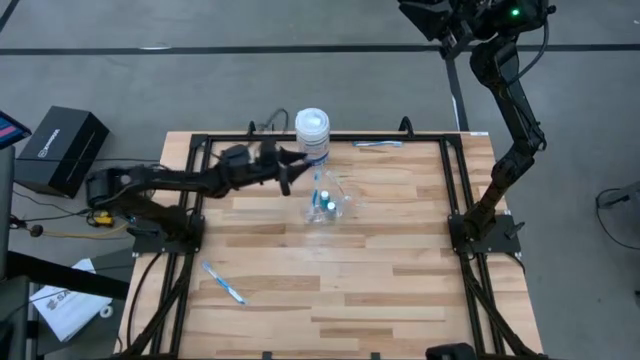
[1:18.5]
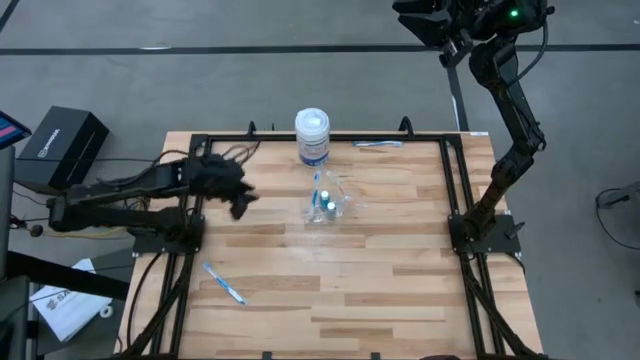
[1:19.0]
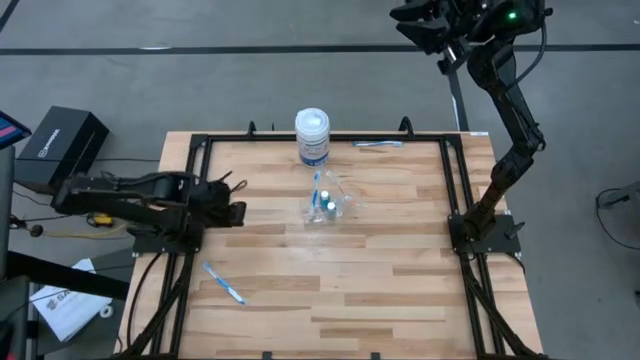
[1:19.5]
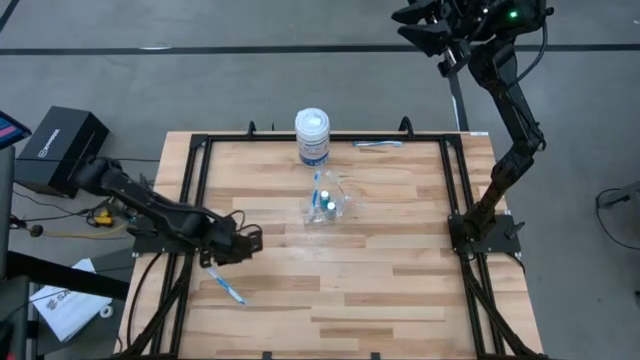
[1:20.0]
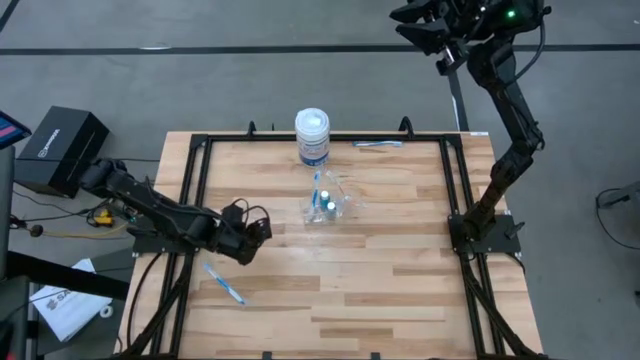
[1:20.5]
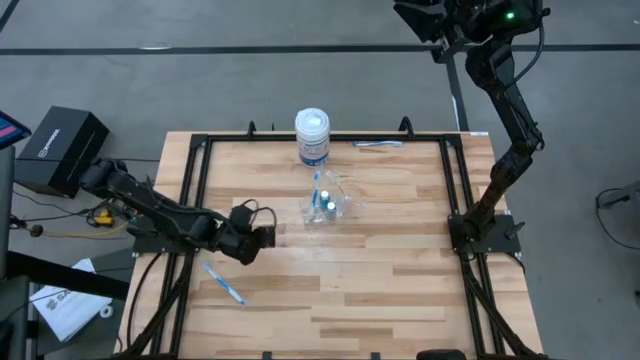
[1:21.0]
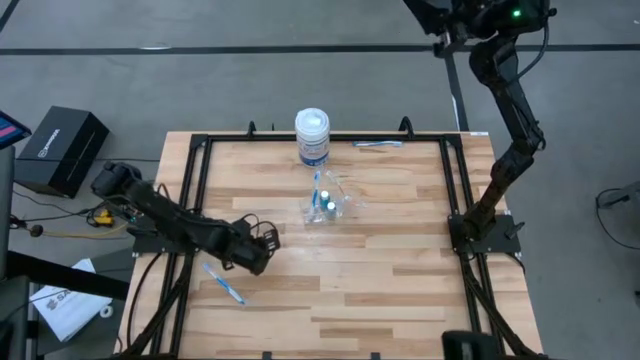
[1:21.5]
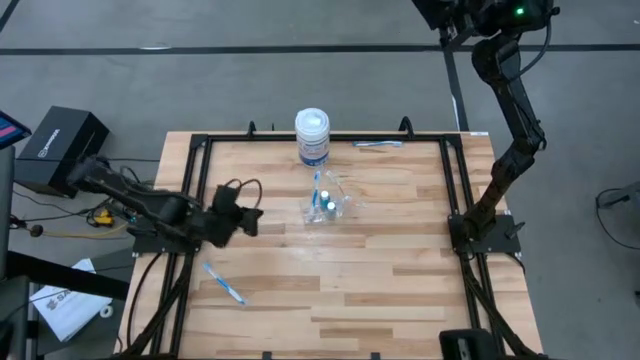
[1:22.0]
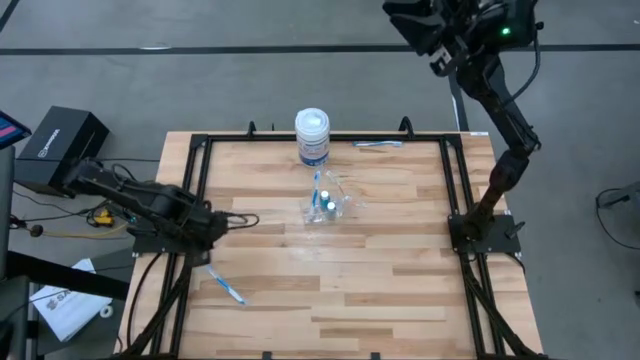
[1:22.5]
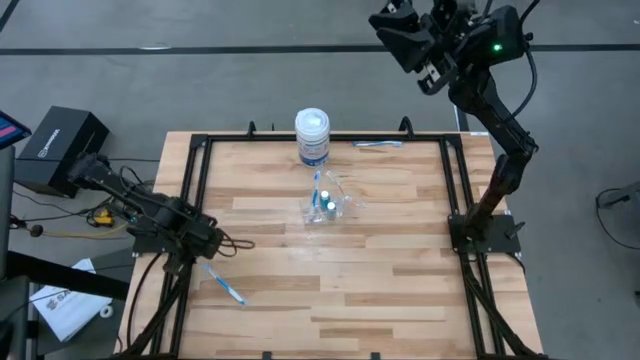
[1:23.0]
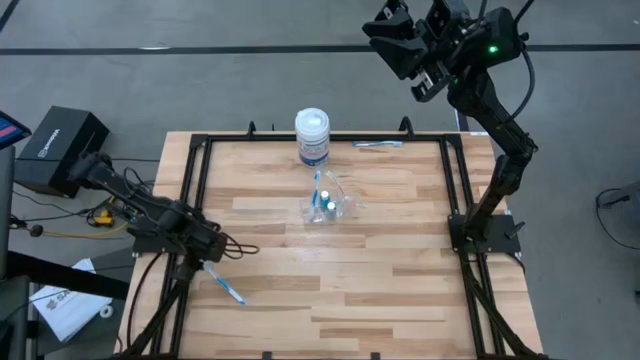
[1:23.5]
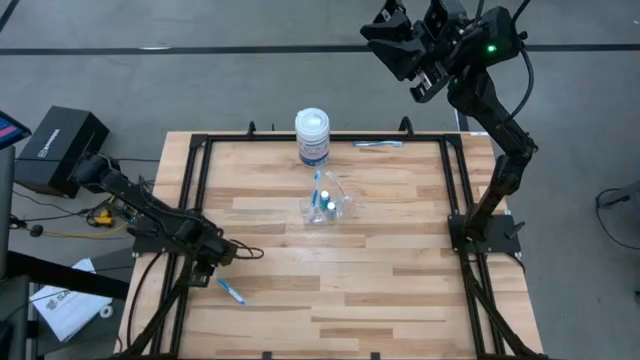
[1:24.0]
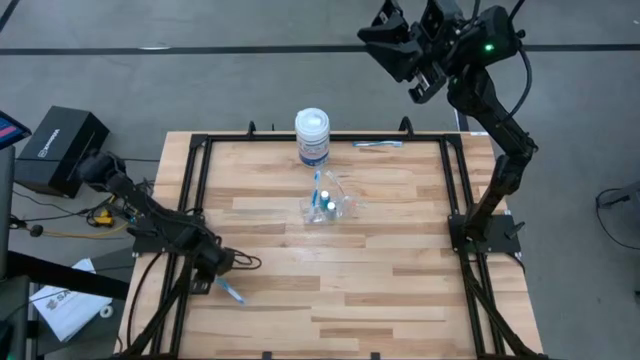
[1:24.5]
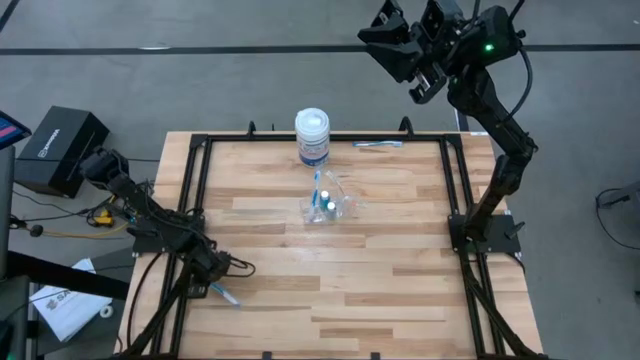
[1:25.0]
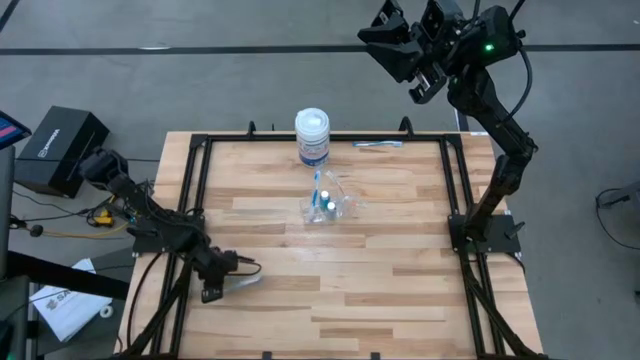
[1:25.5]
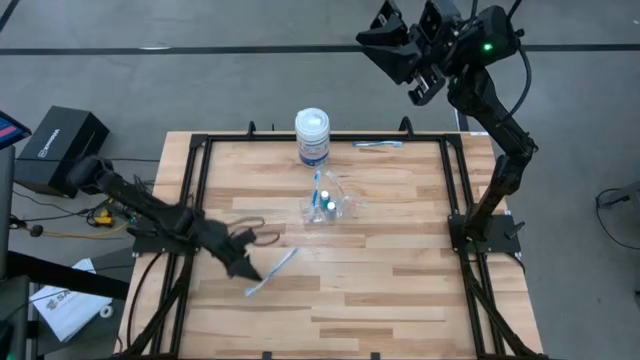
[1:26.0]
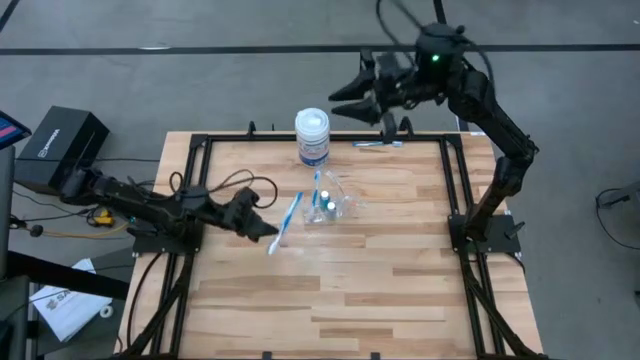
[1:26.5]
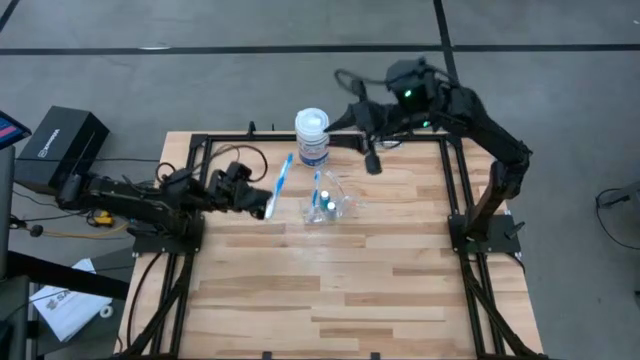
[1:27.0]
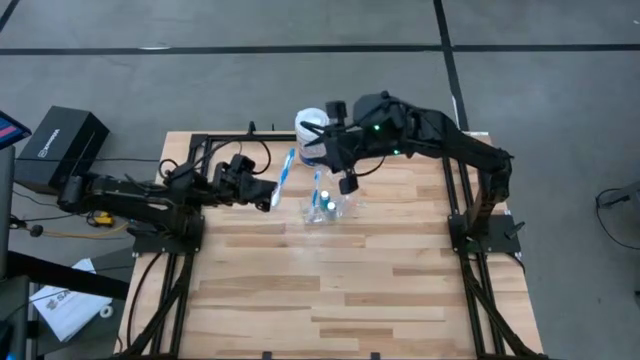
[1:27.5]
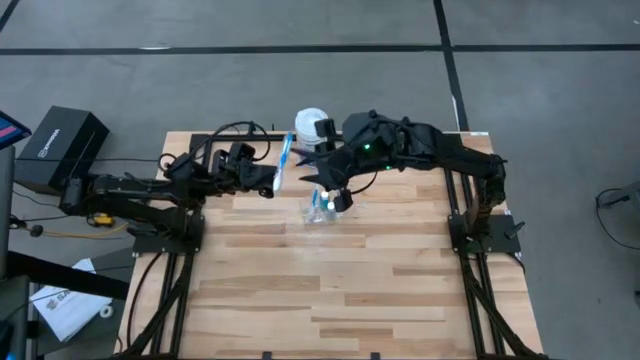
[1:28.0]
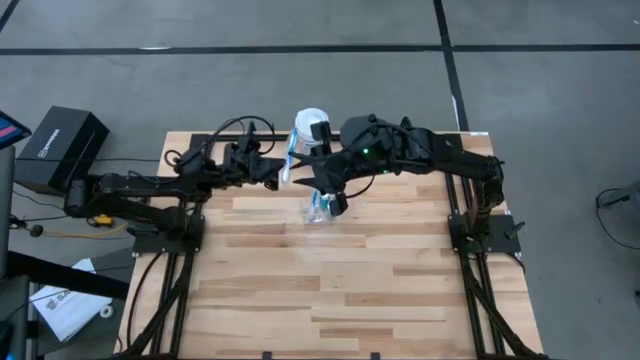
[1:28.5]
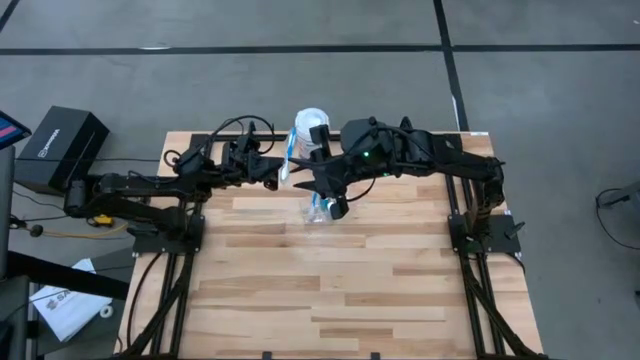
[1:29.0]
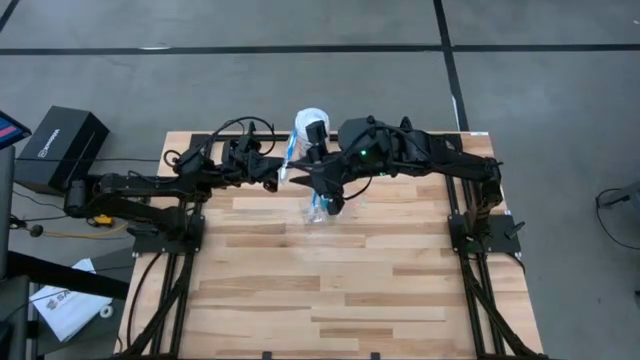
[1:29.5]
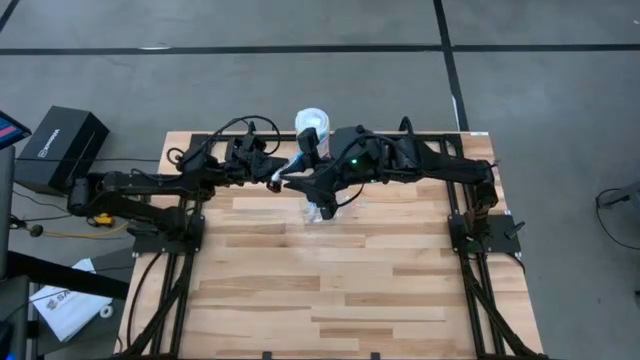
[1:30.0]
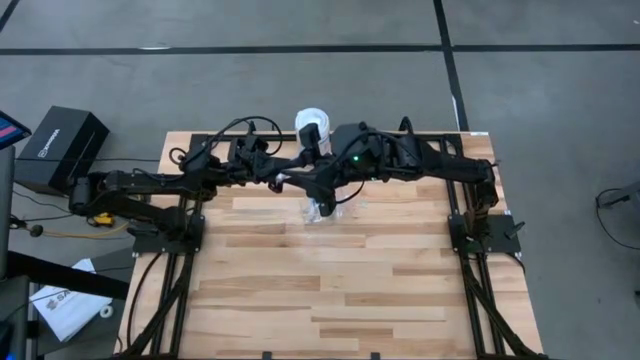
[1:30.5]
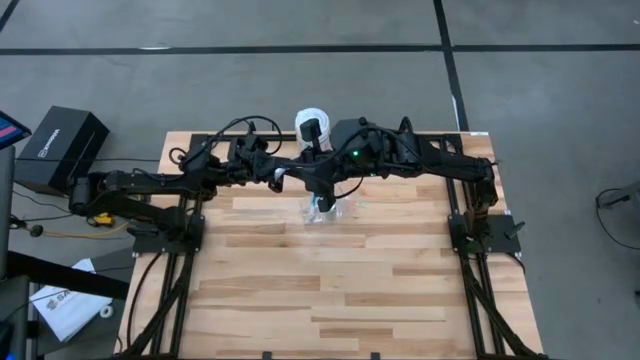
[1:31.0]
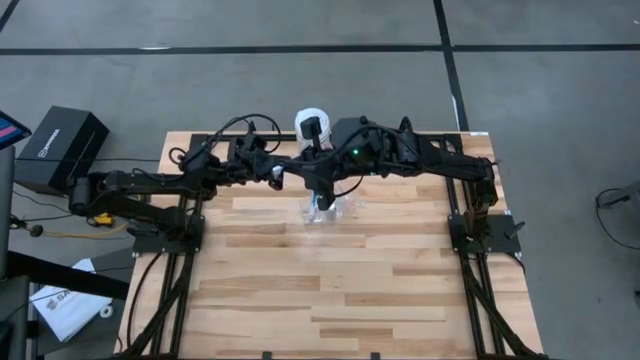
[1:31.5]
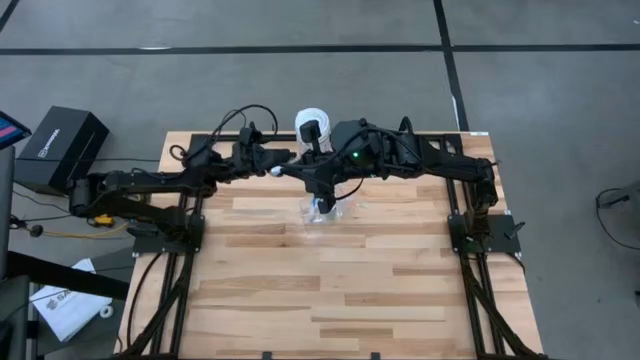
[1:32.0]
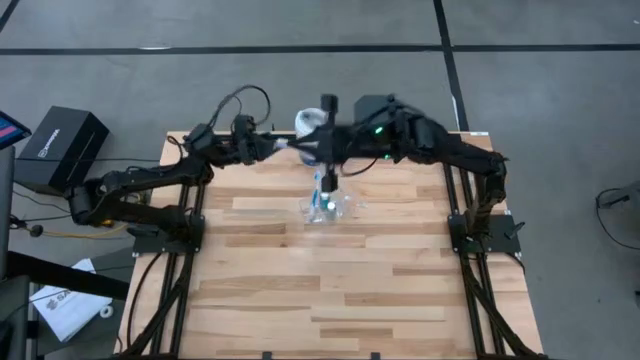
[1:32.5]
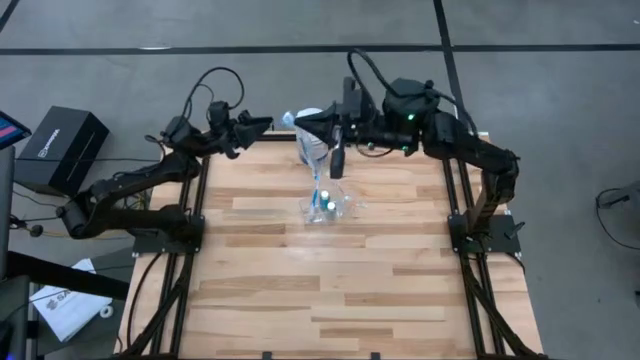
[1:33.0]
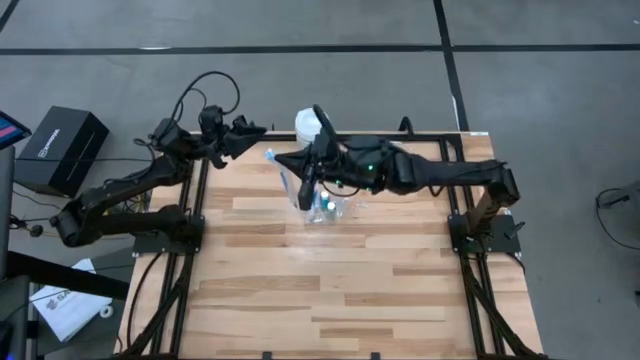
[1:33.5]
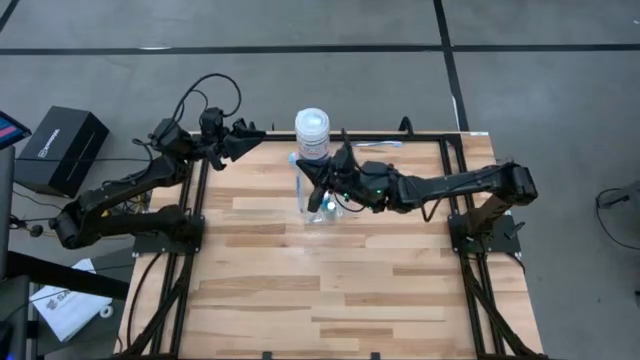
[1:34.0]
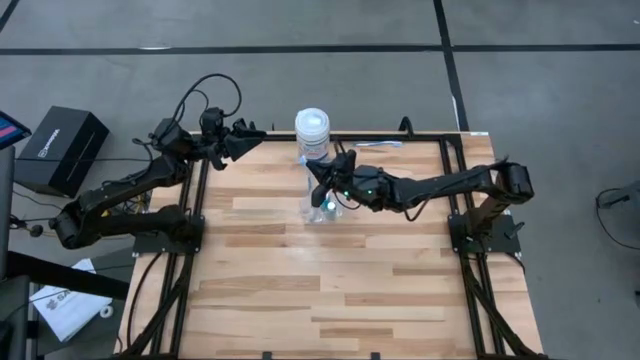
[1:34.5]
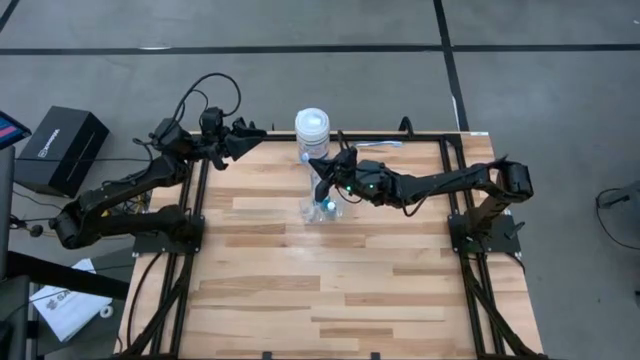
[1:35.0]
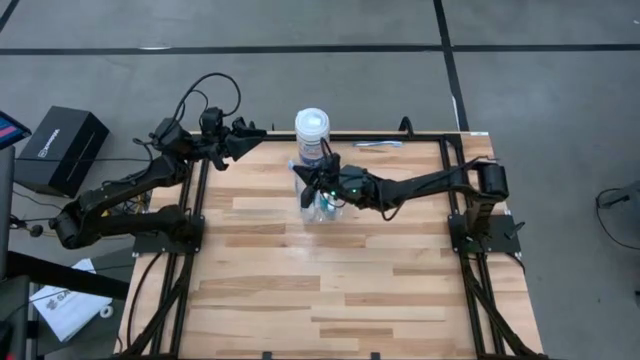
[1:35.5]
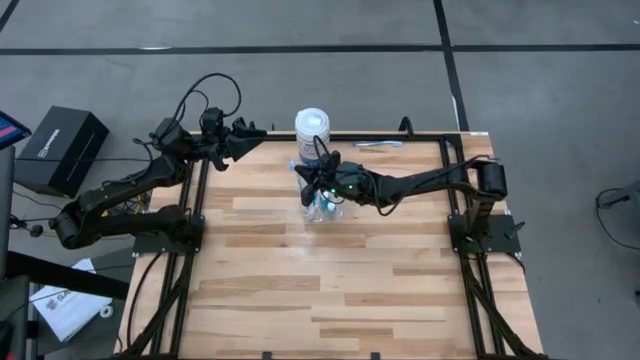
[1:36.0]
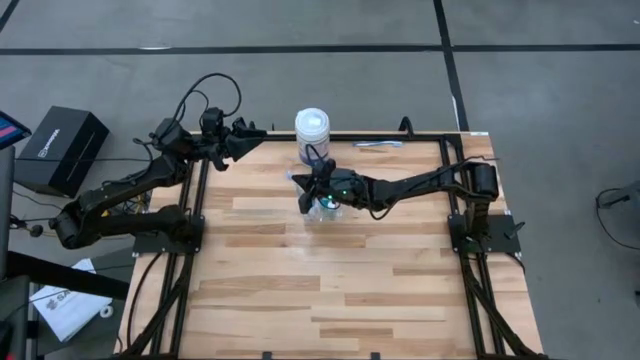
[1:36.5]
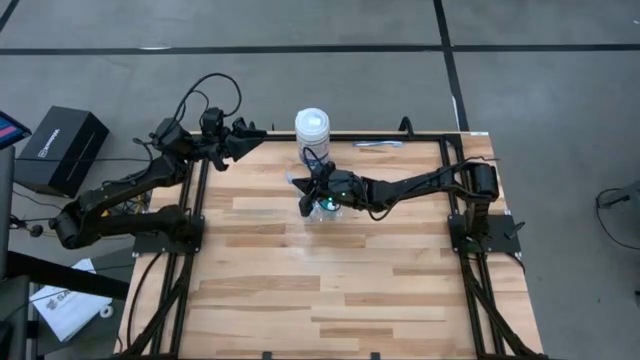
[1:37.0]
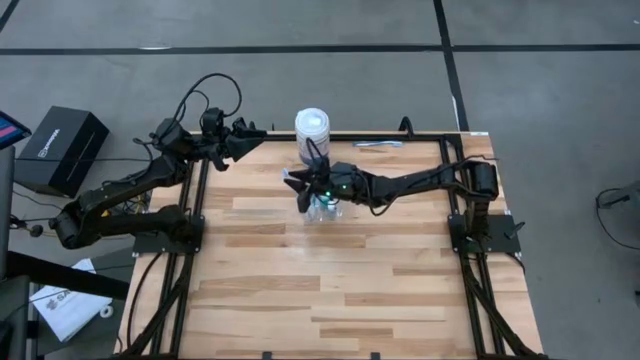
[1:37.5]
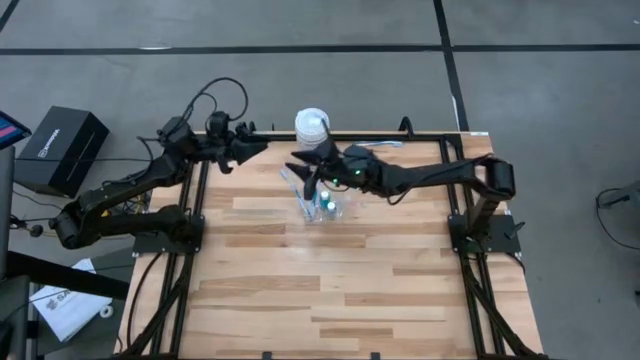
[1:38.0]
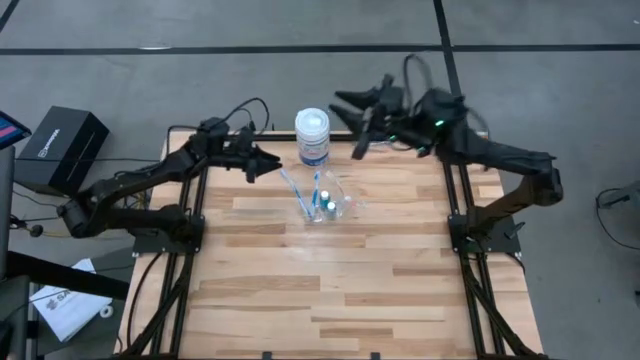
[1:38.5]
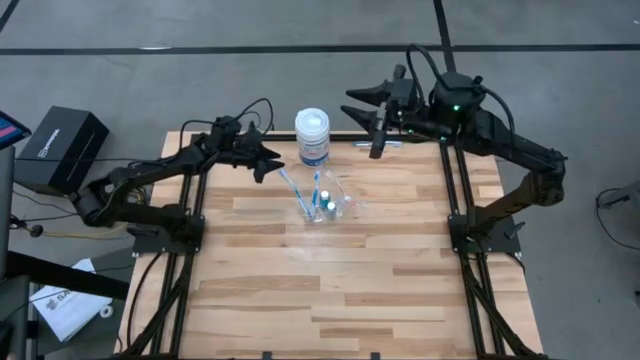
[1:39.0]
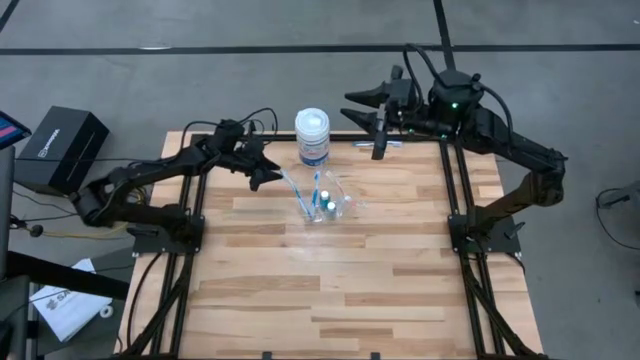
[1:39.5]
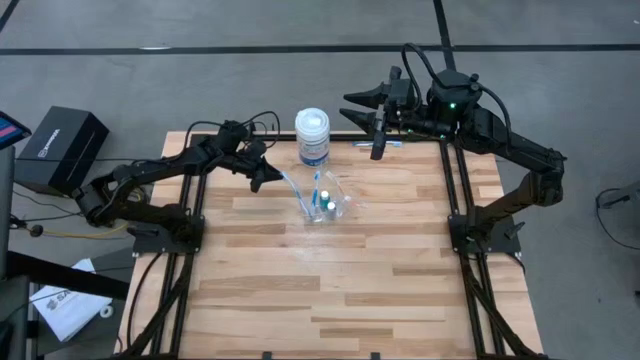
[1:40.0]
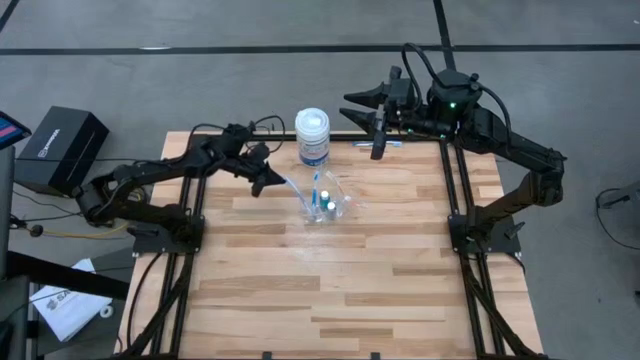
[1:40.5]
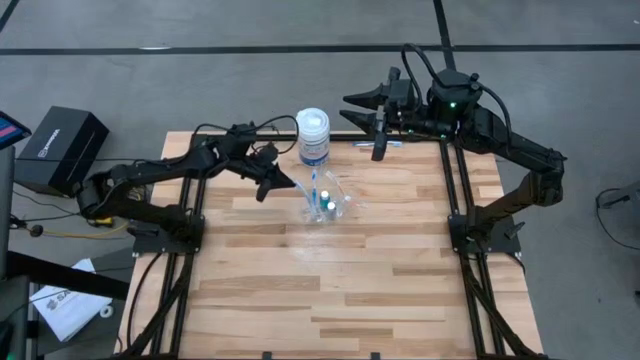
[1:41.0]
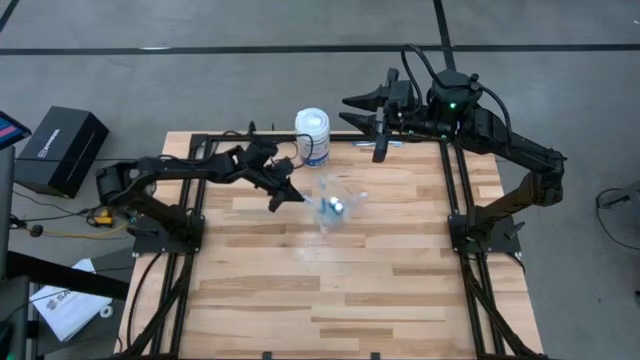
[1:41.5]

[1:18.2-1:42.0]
Task: Pick & Place toothbrushing station
Put the bottom blue toothbrush into the transparent organizer
